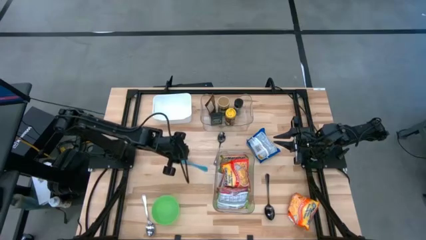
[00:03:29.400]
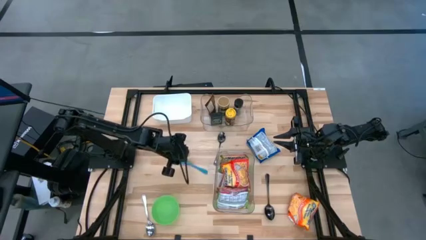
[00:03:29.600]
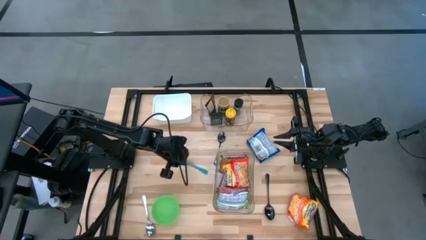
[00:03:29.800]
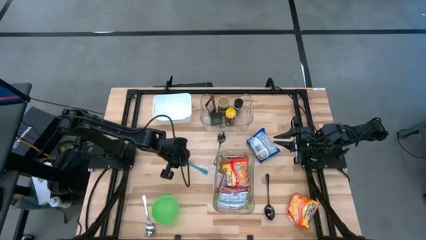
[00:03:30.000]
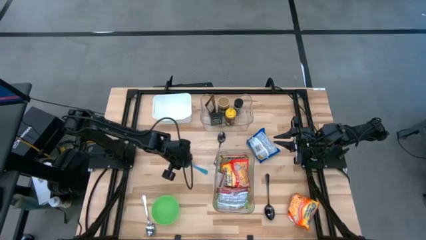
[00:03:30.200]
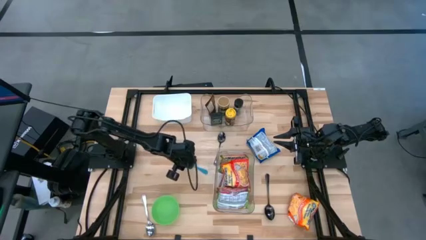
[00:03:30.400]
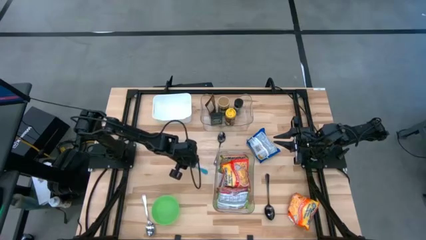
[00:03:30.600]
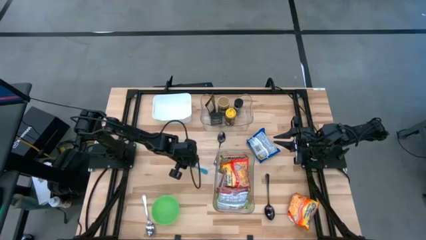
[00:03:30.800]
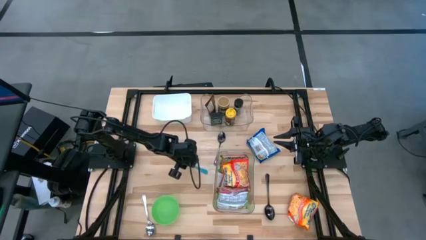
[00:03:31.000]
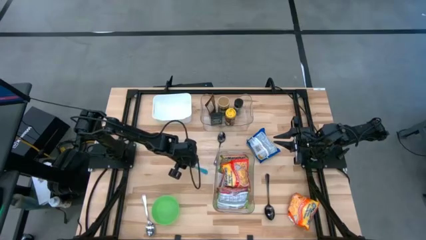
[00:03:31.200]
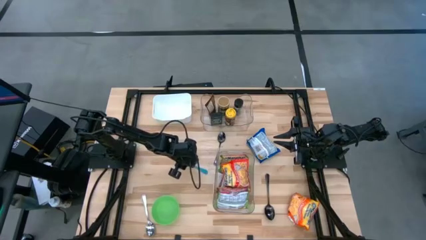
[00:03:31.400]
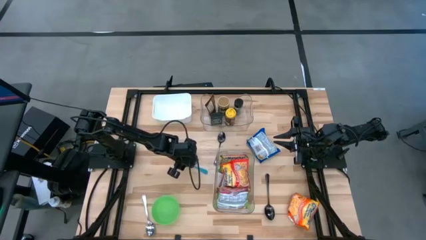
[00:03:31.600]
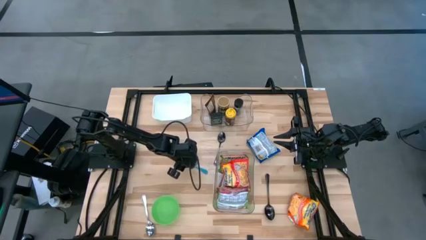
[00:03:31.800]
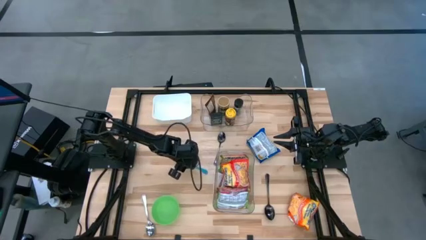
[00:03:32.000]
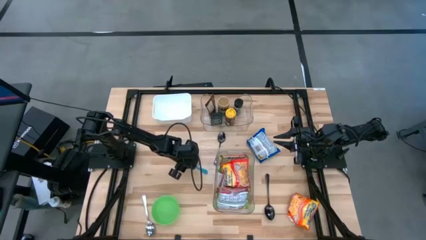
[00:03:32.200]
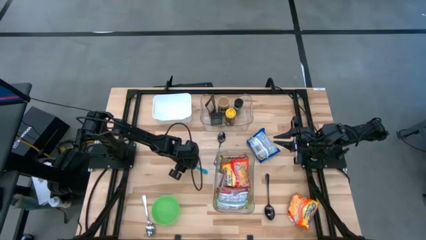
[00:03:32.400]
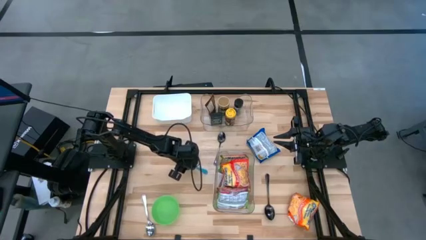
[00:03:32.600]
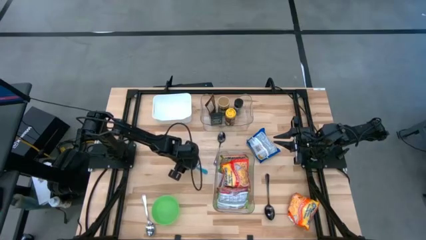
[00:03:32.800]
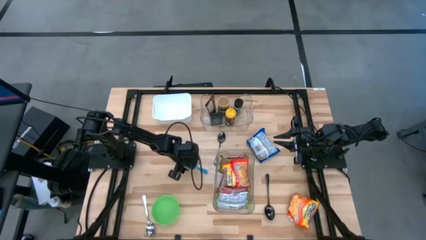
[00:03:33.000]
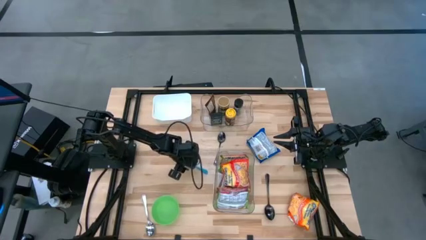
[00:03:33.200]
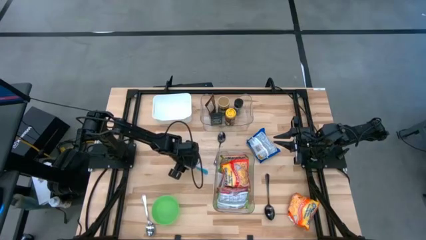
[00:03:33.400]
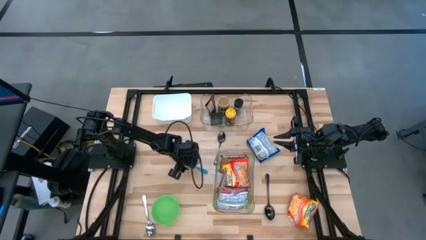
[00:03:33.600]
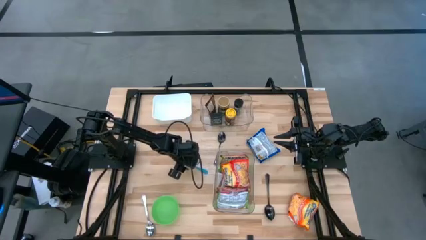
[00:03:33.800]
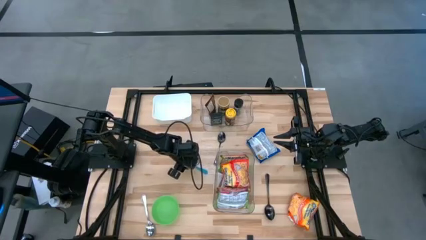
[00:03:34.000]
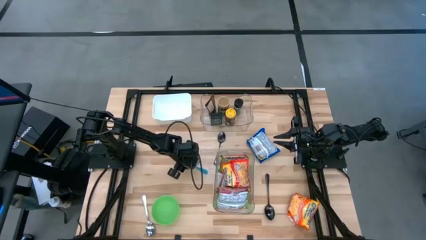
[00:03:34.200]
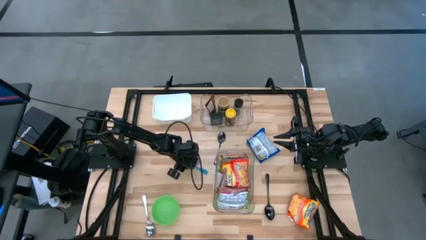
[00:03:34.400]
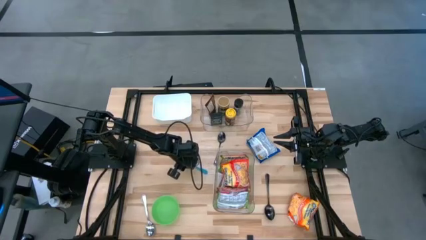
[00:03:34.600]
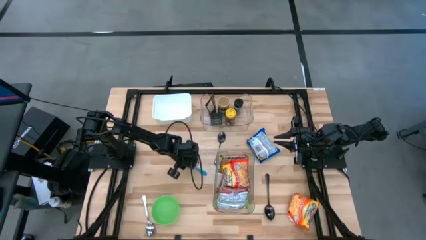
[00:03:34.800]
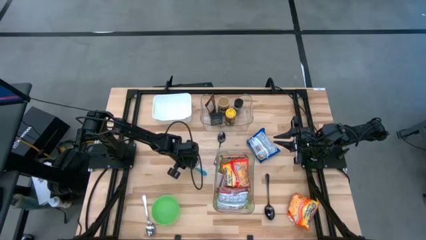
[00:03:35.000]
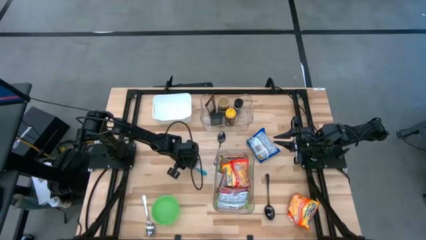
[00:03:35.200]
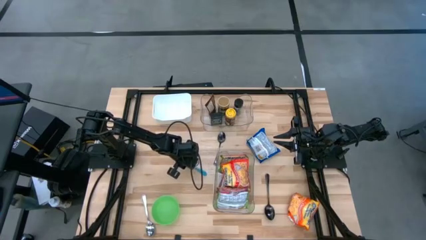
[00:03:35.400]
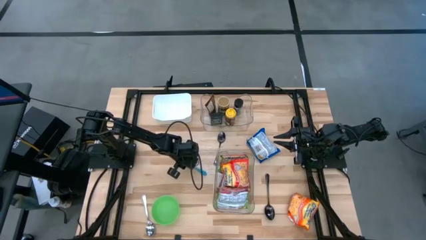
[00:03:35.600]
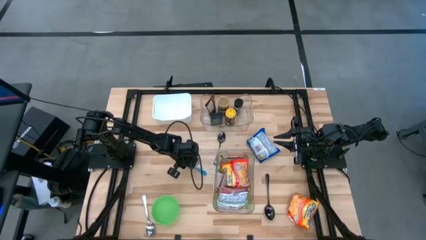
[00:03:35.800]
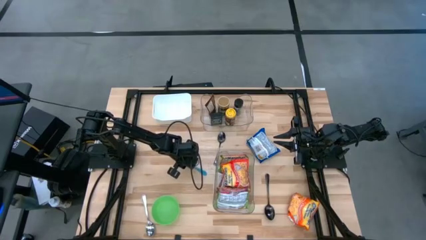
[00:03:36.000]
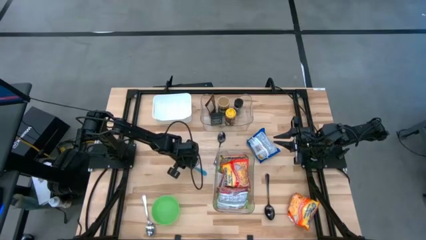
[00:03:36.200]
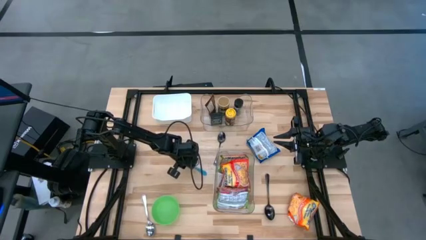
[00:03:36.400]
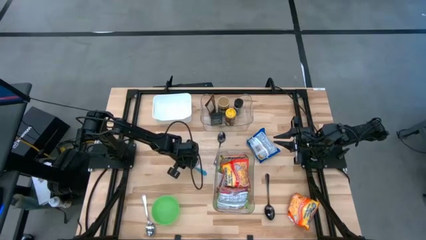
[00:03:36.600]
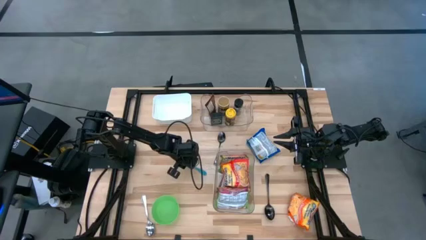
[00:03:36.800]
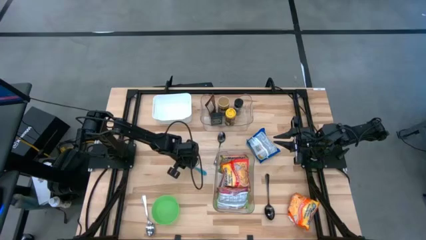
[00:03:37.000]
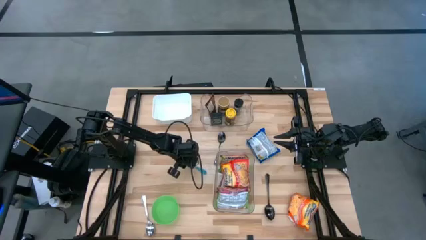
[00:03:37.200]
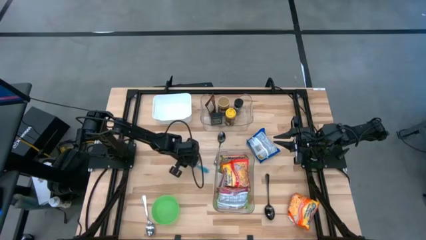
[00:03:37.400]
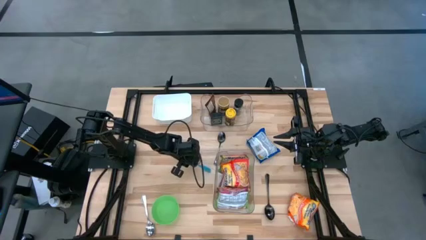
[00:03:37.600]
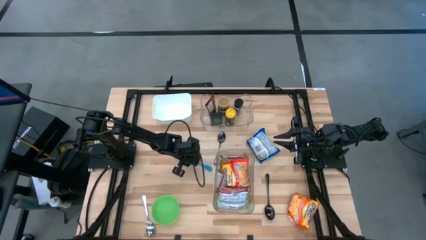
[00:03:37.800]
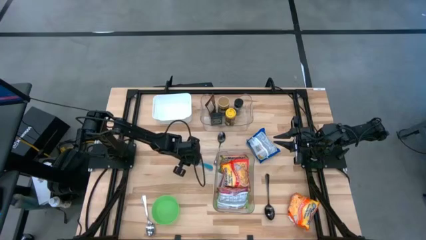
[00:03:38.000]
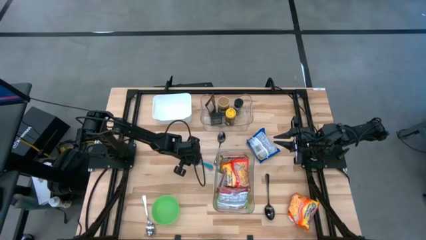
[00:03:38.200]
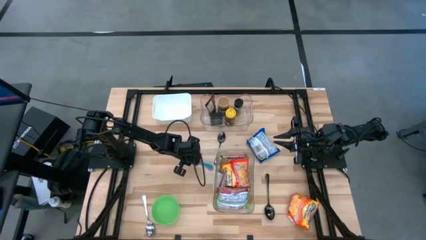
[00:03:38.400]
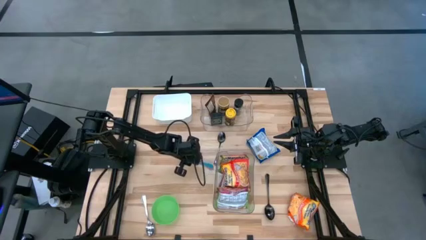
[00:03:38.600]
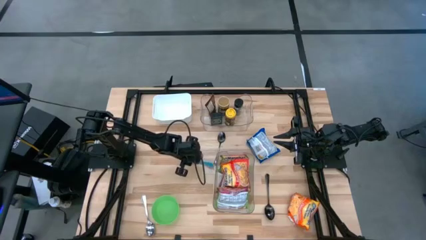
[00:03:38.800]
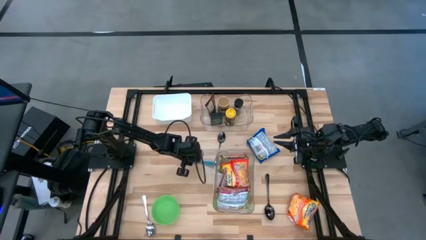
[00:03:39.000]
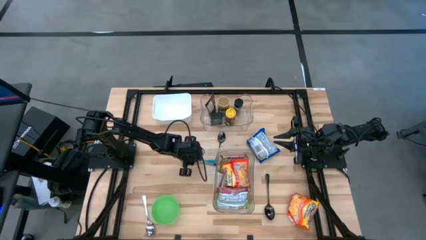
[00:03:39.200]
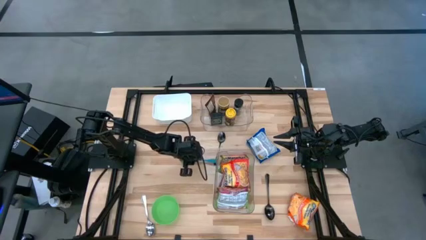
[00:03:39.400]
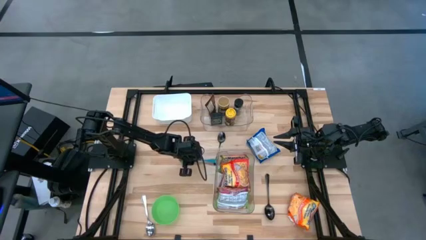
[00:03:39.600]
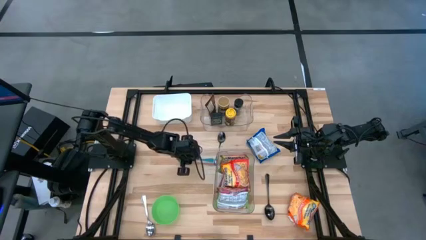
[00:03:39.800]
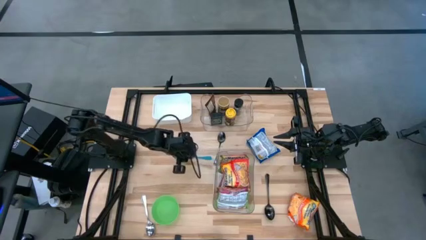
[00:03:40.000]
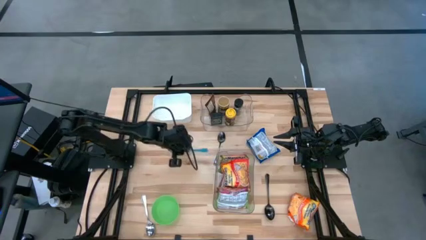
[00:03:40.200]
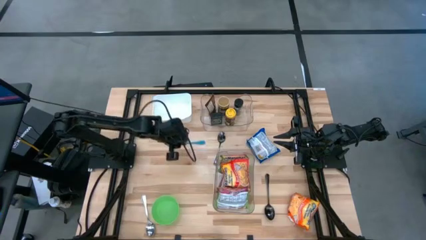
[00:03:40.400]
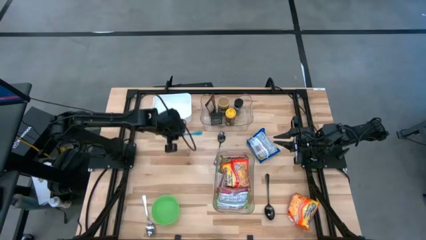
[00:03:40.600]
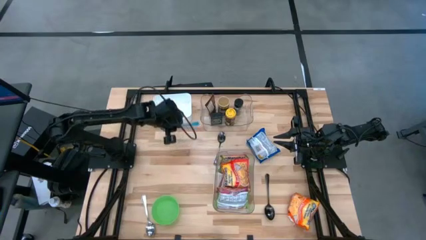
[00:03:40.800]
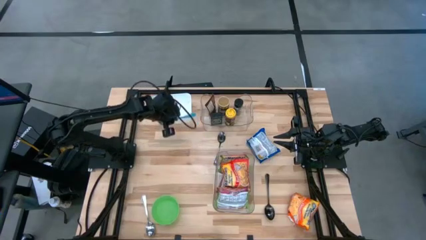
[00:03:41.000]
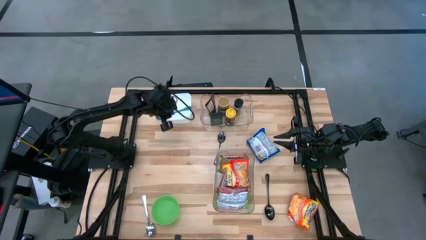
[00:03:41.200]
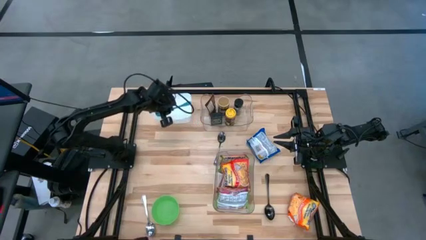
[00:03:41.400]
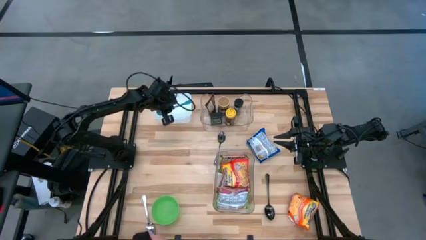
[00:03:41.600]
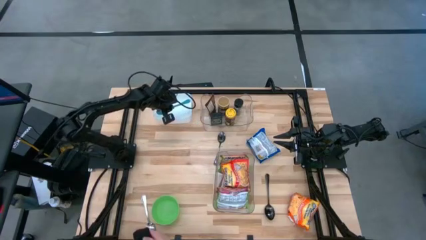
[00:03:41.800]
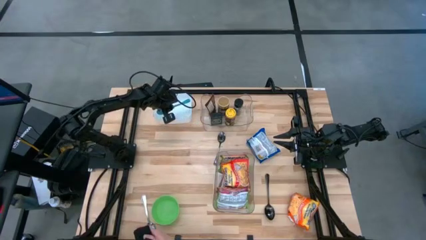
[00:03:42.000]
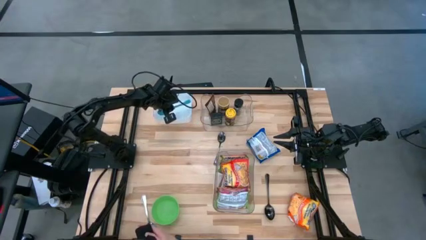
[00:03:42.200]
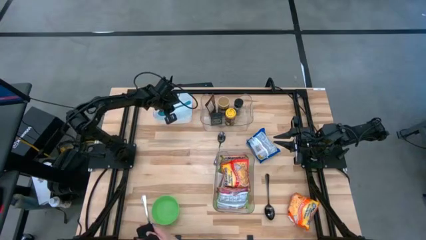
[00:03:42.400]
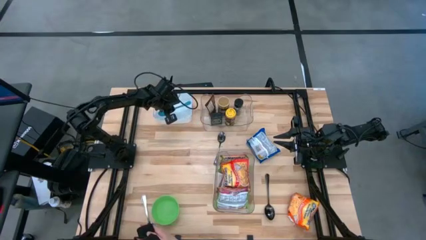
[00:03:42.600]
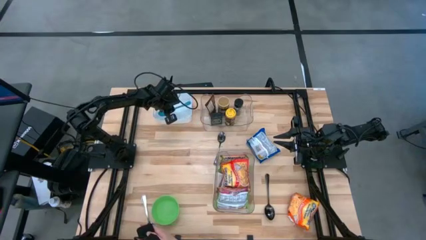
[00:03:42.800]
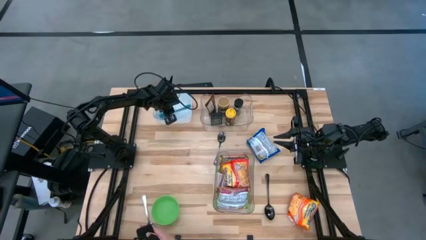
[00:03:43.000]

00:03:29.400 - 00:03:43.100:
Task: Pick & Place Food Item
Put the blue spoon into the white bin
